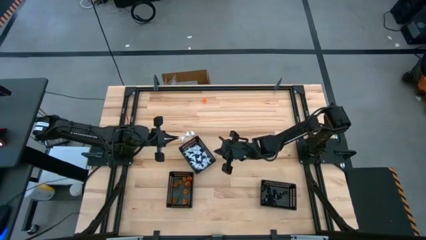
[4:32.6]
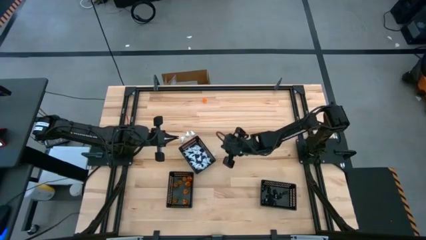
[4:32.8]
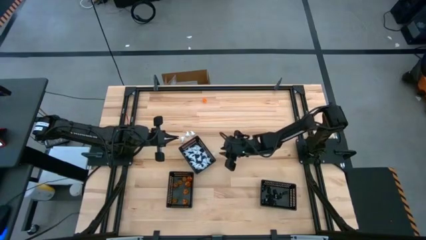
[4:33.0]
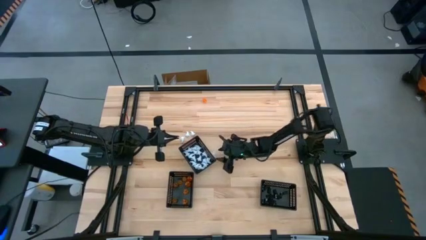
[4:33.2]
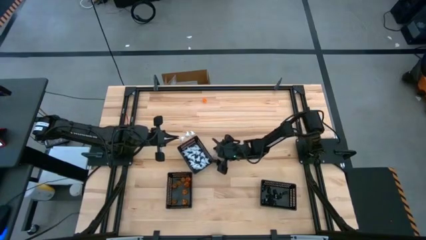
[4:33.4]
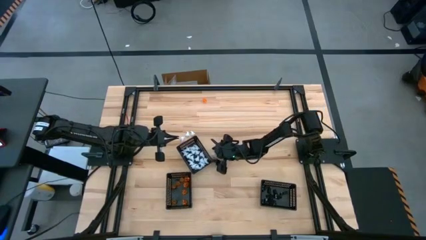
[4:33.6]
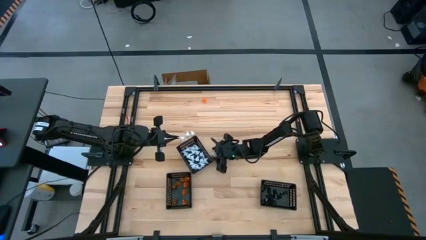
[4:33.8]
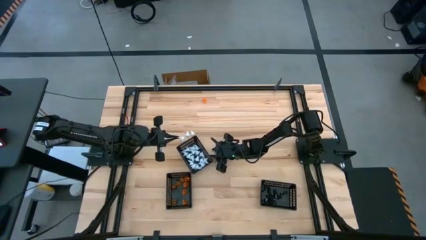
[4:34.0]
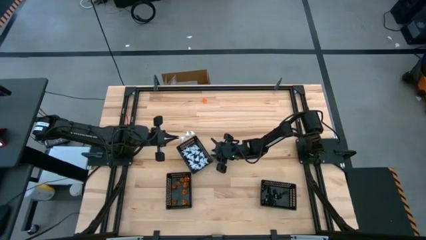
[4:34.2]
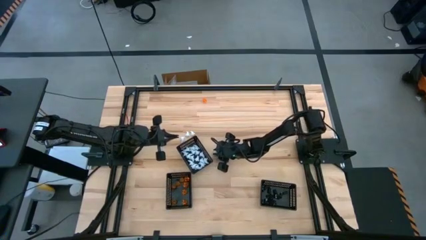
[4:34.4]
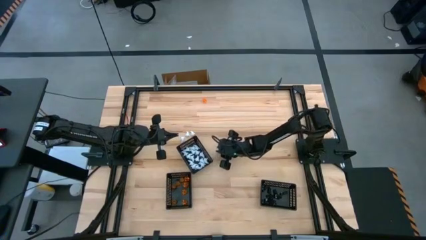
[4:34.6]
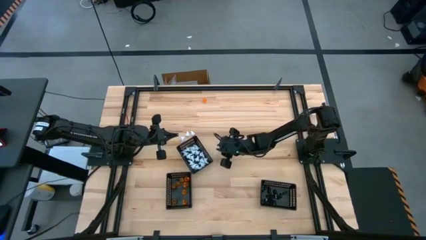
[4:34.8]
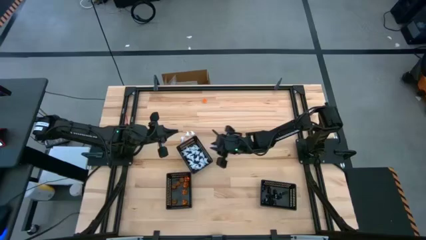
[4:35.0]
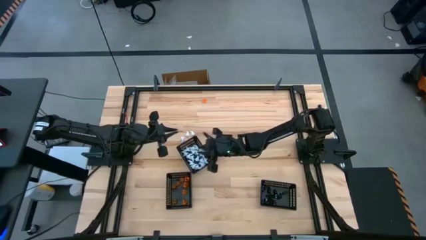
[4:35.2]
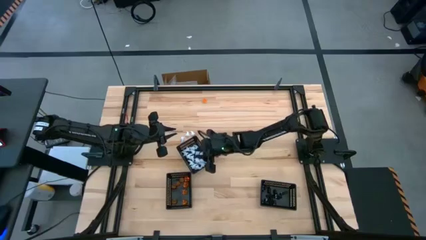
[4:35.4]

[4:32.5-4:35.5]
Task: Sort Halloween decoration
Put the white ghost toy into the middle black basket

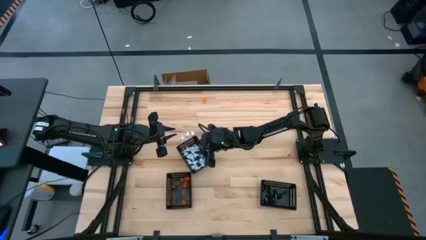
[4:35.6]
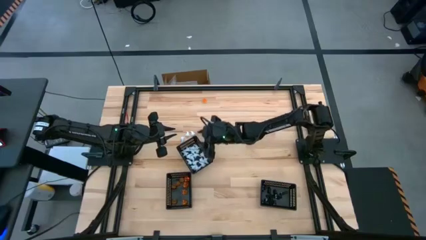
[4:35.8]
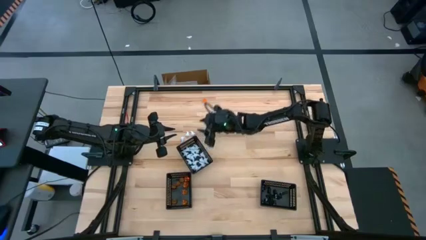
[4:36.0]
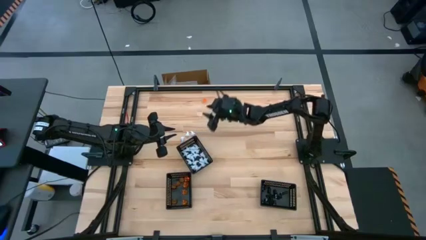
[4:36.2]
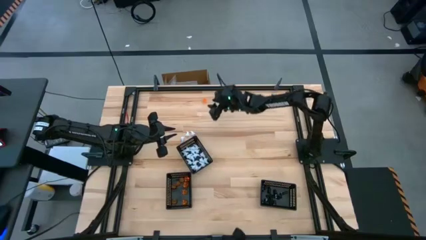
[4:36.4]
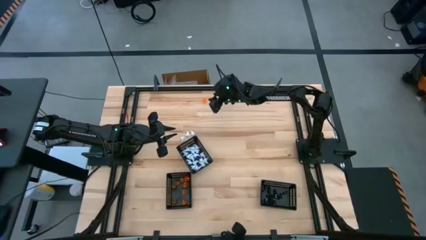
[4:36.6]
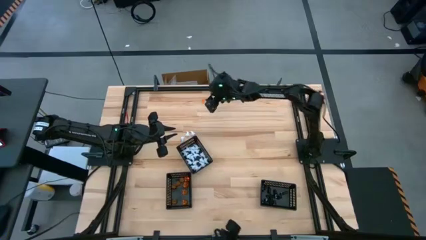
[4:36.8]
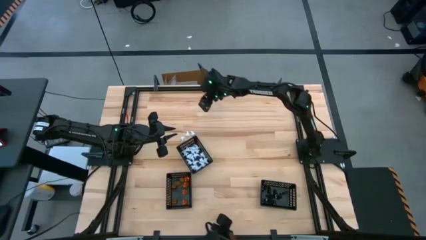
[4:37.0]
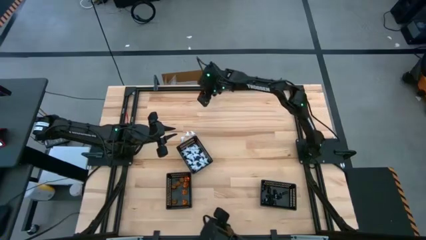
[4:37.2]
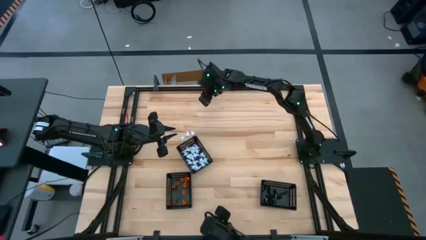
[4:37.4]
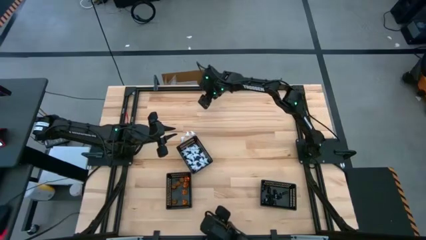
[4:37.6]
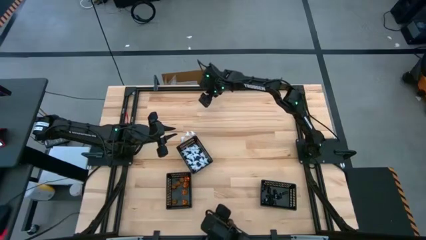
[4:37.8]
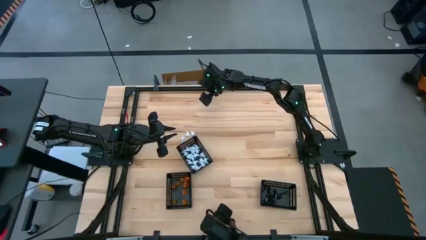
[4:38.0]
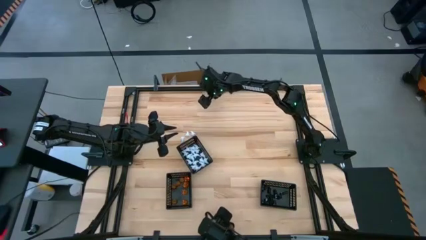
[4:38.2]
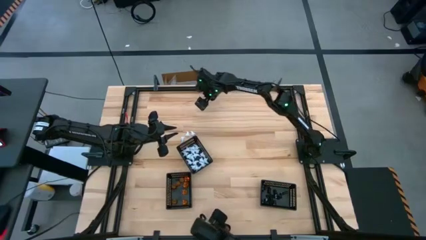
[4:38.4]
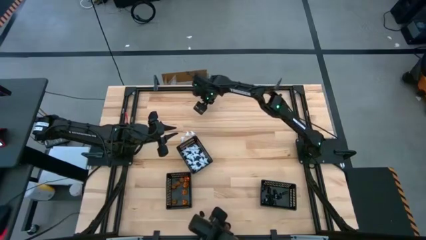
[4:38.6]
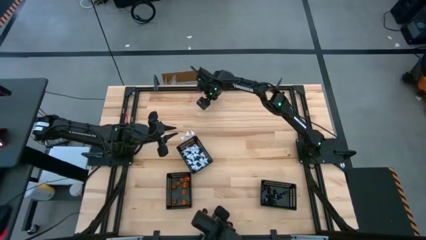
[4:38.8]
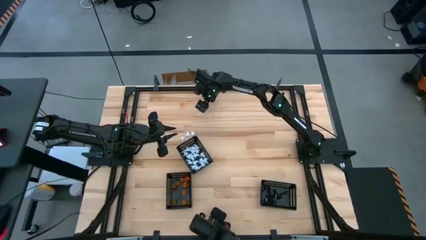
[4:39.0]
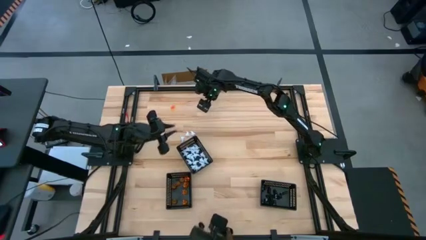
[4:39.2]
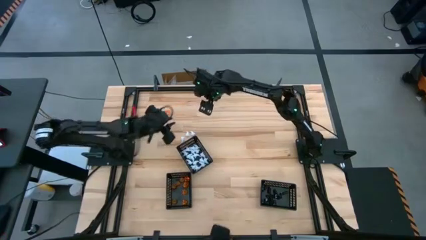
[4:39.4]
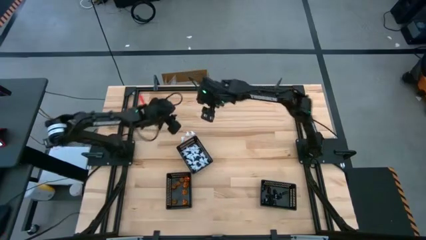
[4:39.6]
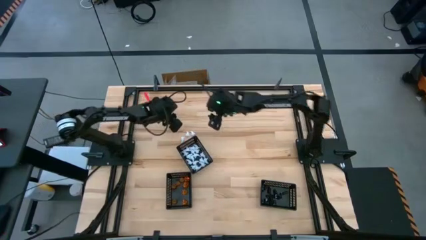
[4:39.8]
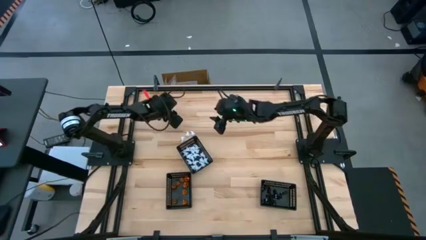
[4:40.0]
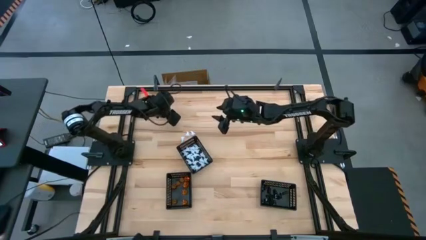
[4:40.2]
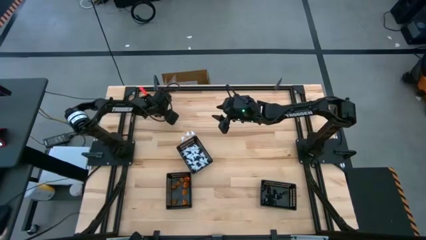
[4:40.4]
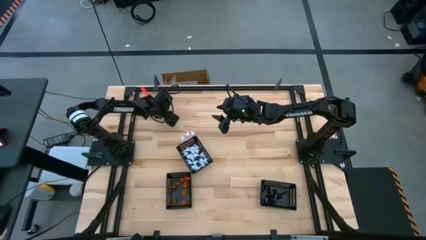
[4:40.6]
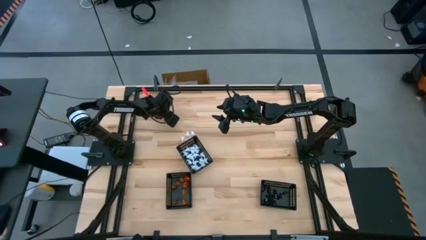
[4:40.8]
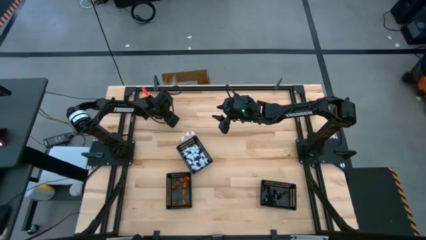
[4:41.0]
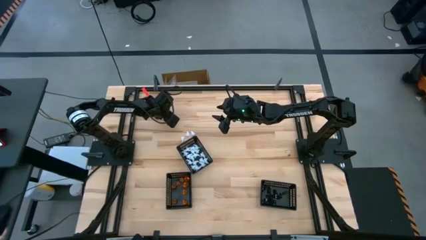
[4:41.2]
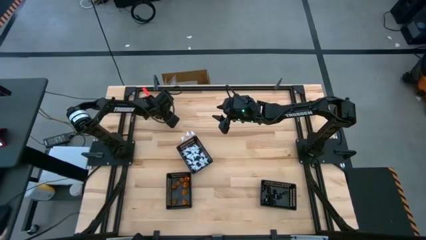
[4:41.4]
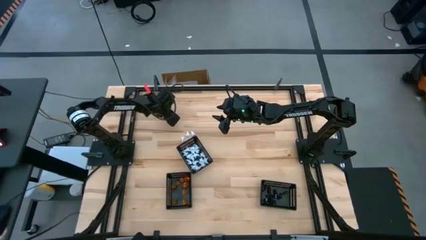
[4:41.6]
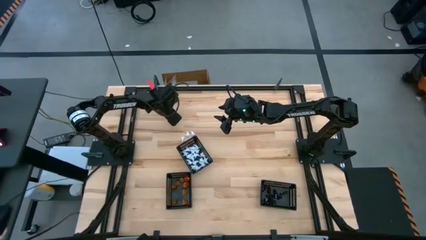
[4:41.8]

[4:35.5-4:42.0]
Put the orange pumpkin toy into the left black basket

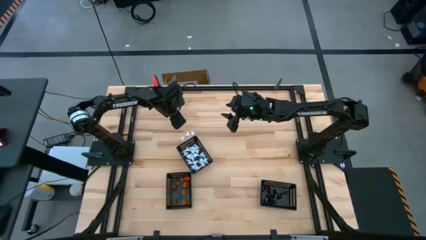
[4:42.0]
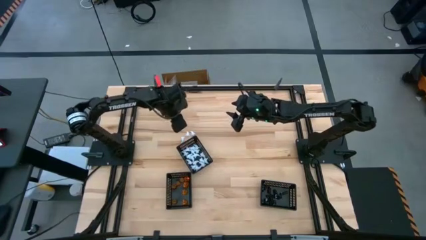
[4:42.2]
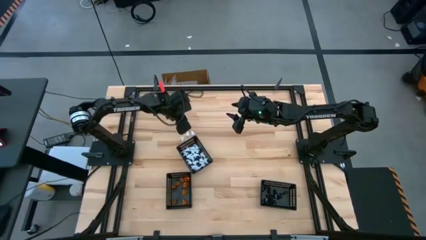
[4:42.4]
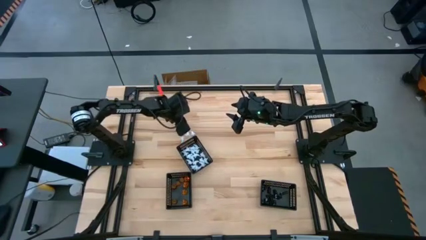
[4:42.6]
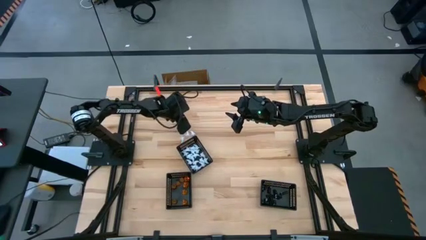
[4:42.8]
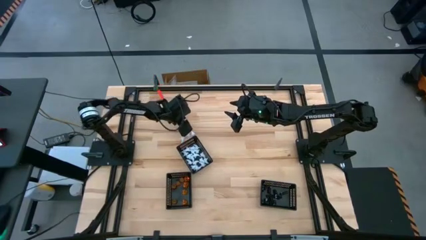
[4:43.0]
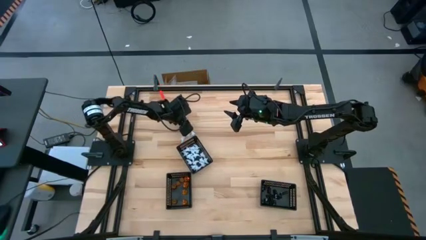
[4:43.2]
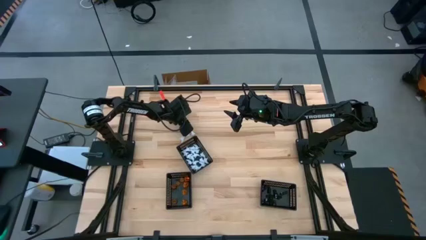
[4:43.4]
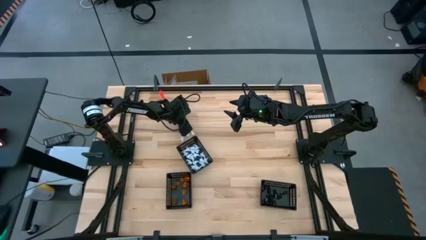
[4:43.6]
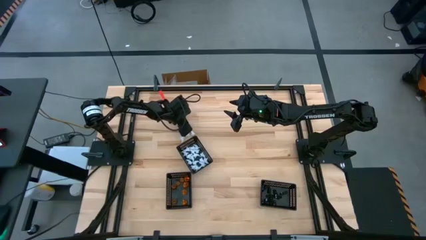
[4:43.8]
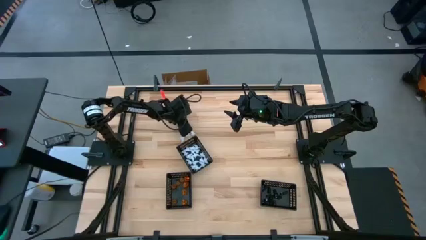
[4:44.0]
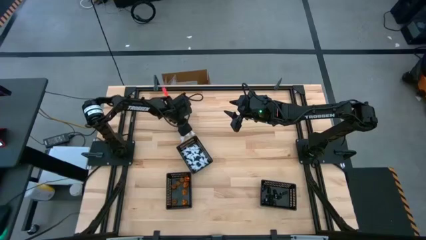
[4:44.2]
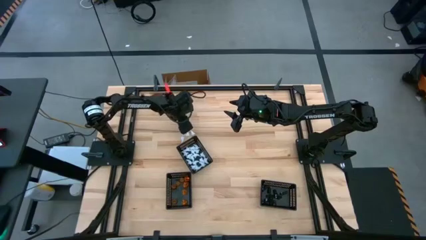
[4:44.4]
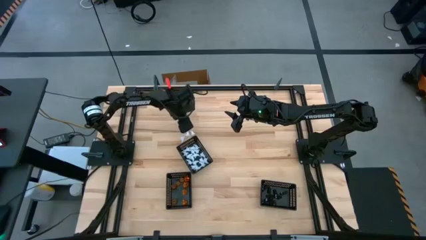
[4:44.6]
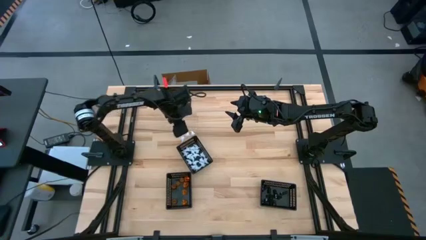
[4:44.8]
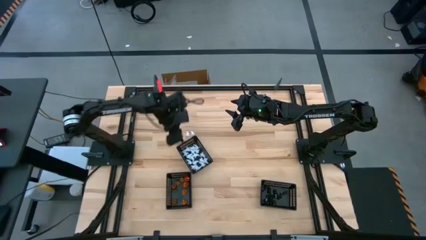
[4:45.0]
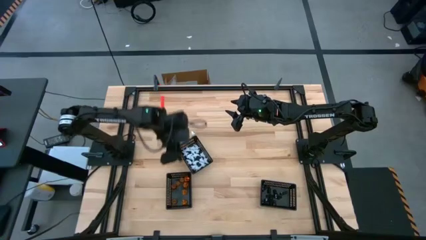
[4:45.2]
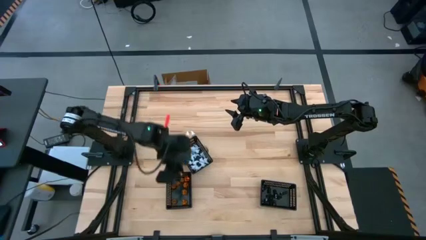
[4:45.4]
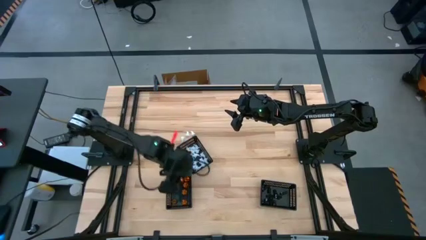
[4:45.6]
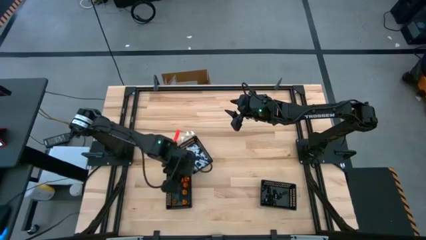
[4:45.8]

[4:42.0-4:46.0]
Put the orange pumpkin toy into the left black basket
